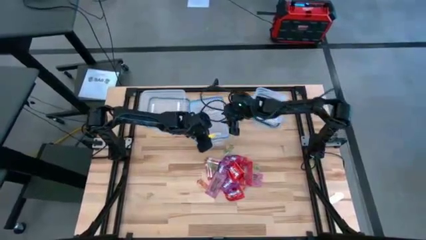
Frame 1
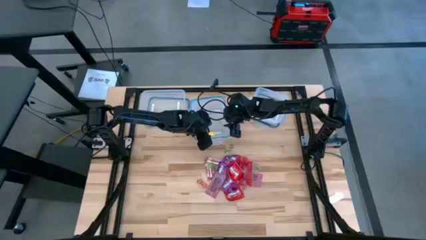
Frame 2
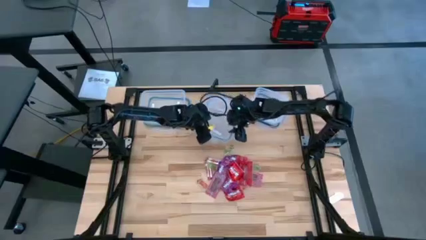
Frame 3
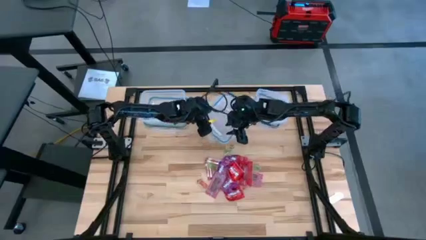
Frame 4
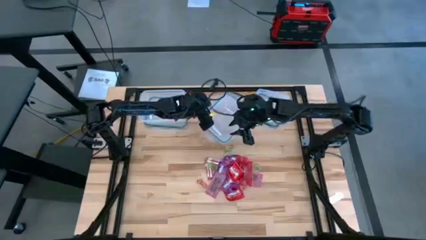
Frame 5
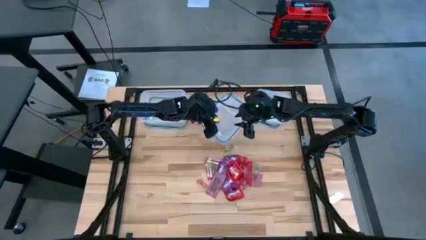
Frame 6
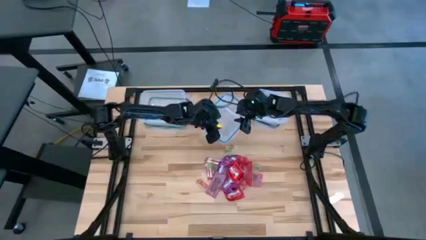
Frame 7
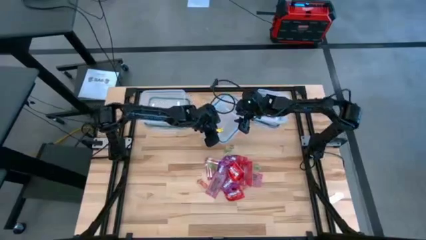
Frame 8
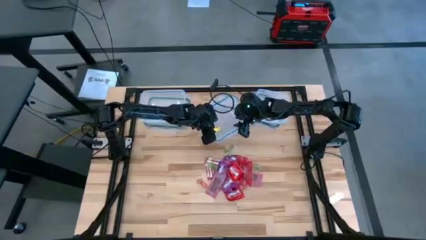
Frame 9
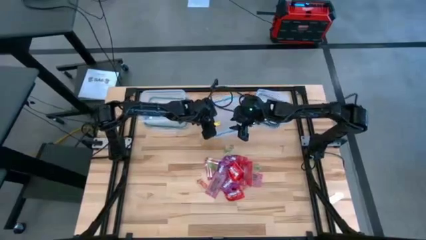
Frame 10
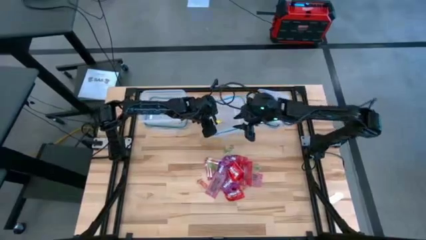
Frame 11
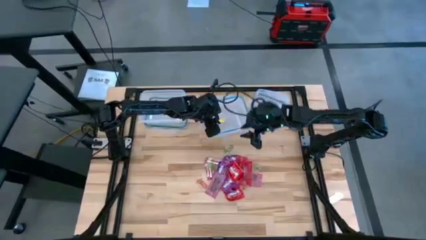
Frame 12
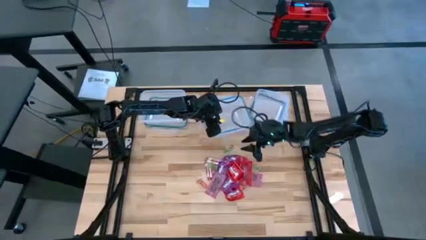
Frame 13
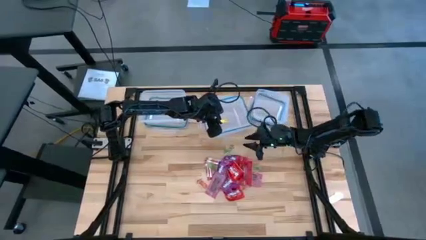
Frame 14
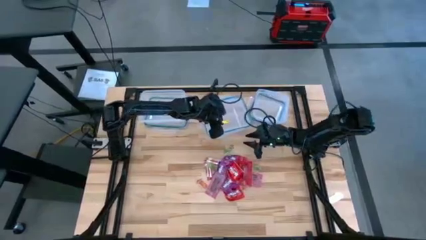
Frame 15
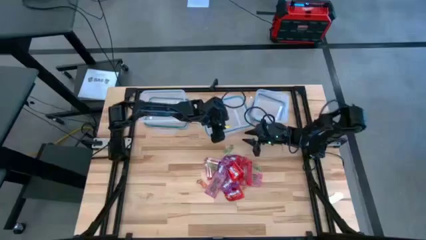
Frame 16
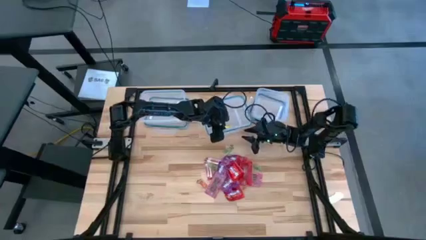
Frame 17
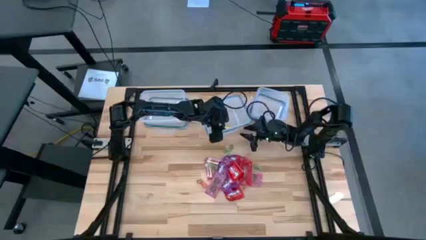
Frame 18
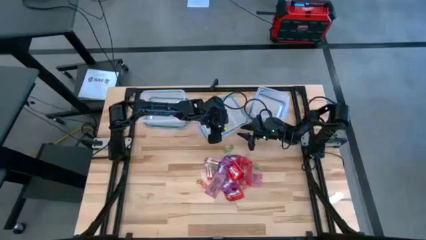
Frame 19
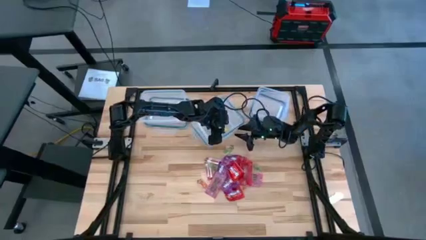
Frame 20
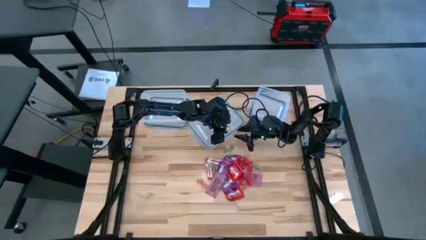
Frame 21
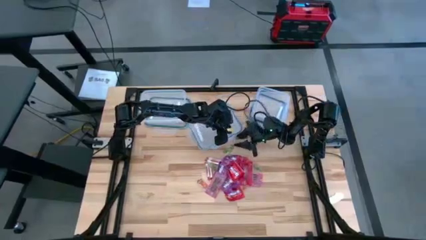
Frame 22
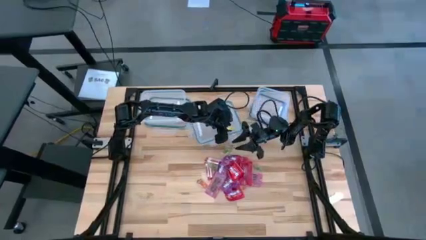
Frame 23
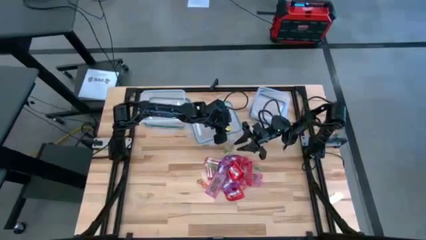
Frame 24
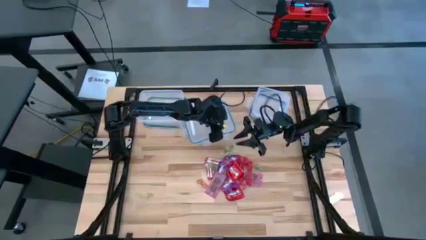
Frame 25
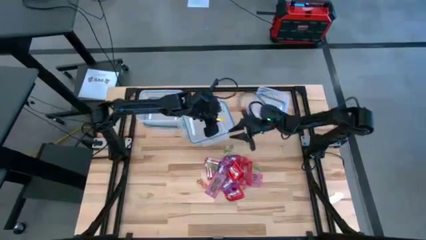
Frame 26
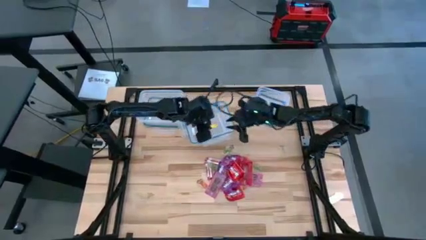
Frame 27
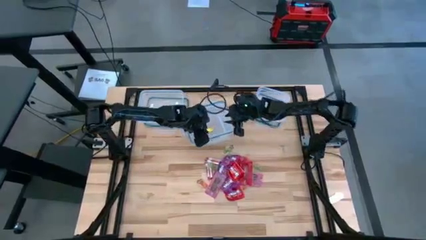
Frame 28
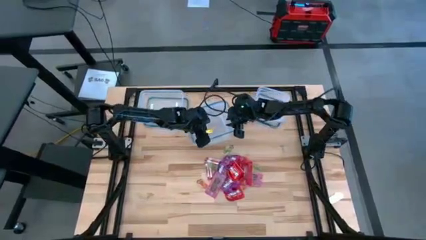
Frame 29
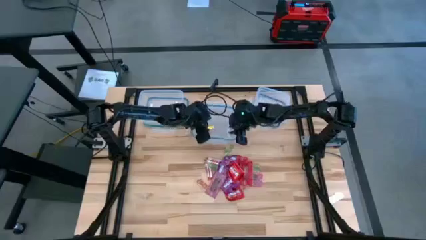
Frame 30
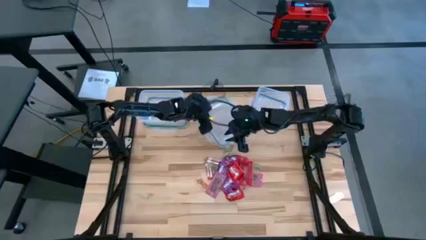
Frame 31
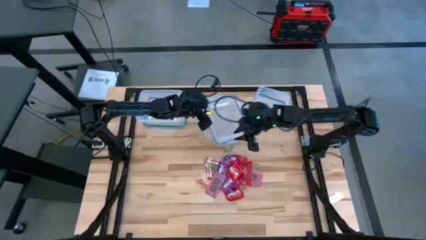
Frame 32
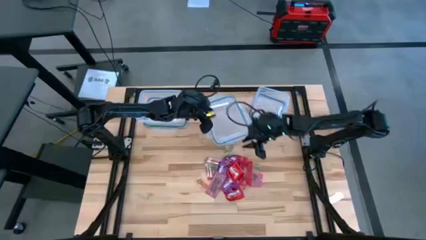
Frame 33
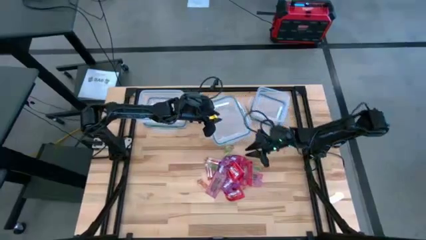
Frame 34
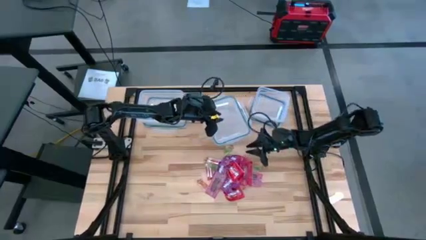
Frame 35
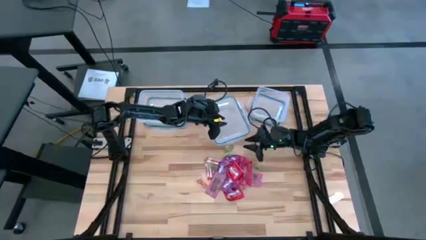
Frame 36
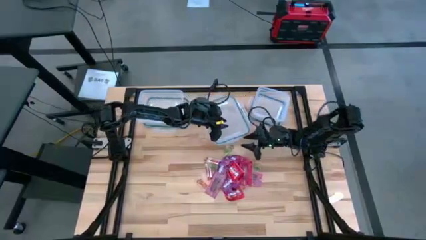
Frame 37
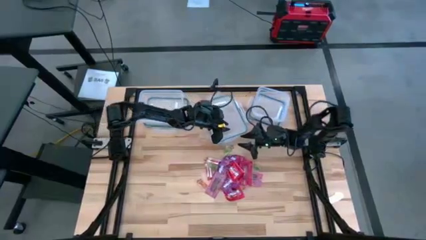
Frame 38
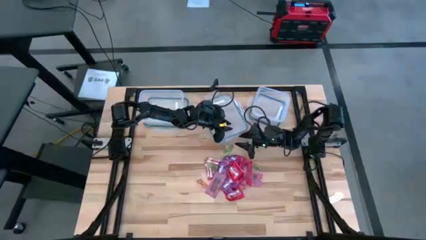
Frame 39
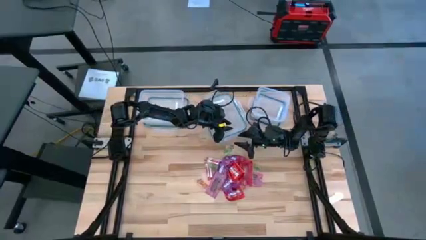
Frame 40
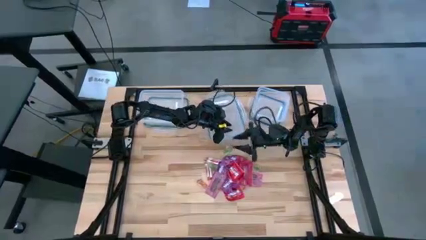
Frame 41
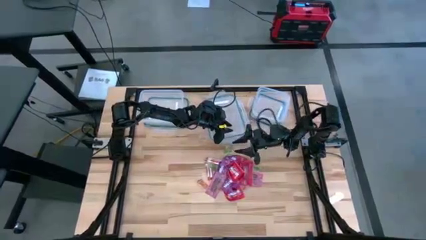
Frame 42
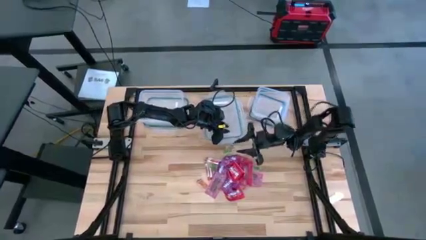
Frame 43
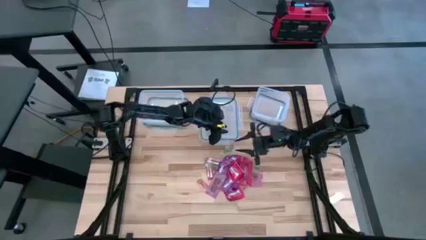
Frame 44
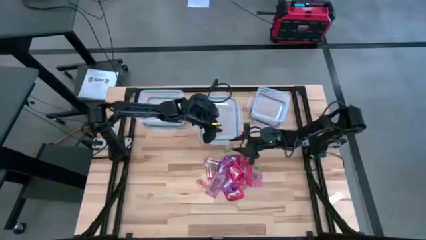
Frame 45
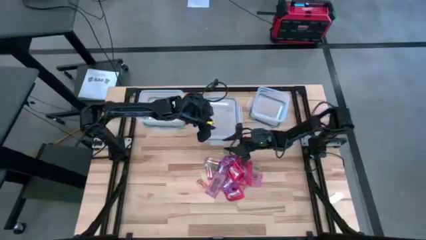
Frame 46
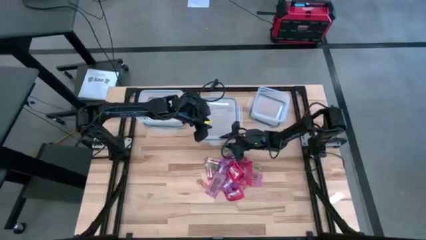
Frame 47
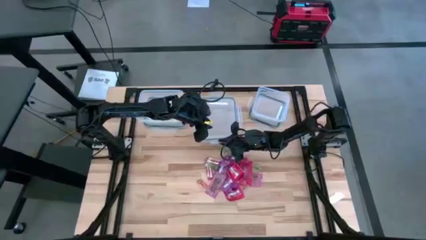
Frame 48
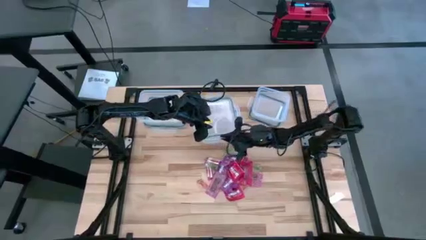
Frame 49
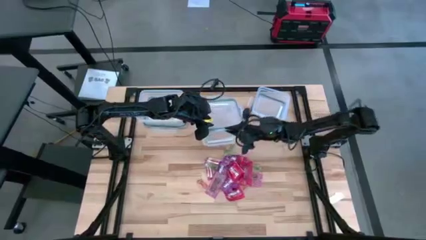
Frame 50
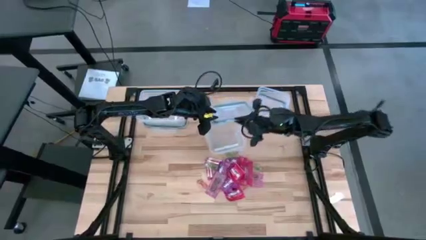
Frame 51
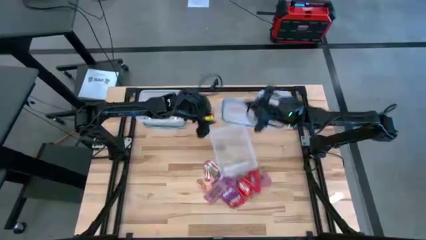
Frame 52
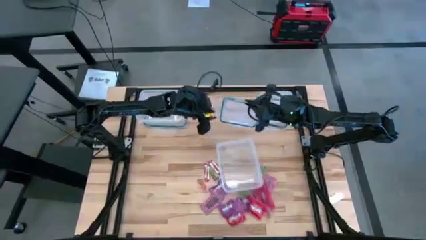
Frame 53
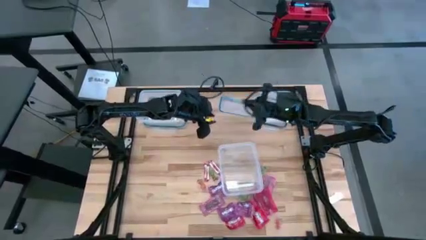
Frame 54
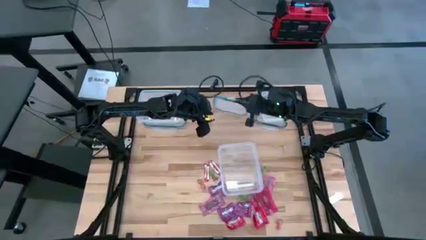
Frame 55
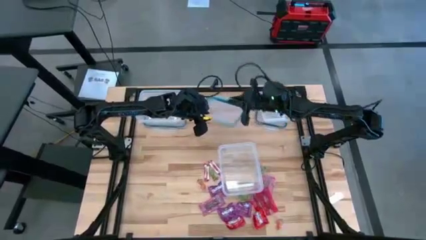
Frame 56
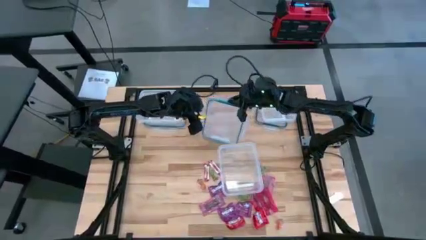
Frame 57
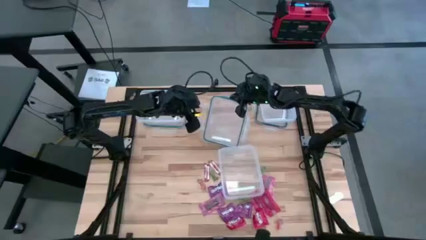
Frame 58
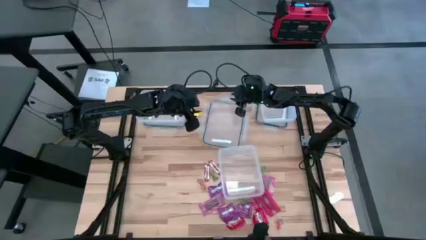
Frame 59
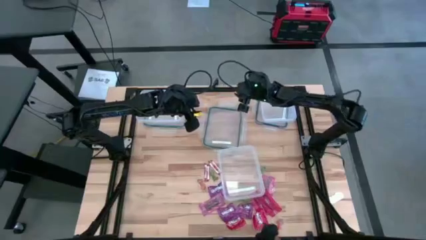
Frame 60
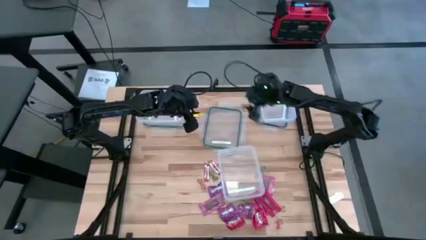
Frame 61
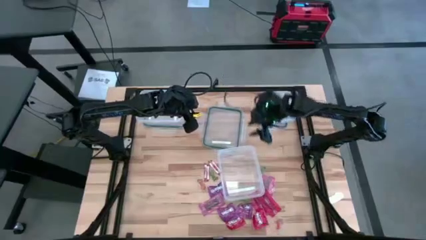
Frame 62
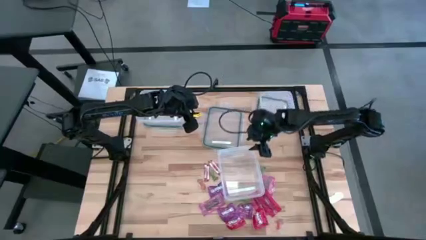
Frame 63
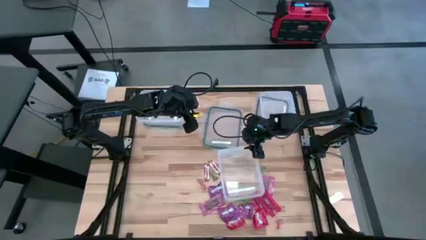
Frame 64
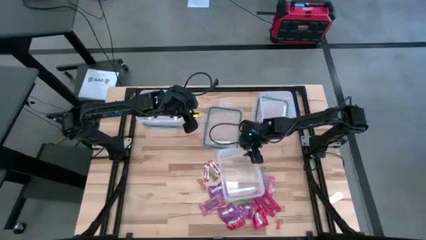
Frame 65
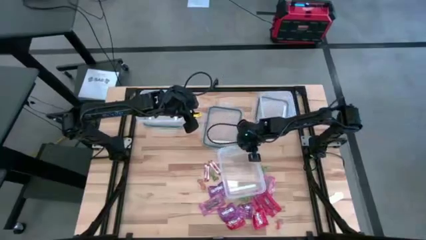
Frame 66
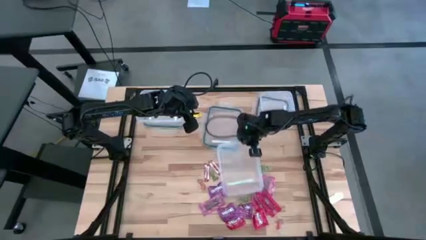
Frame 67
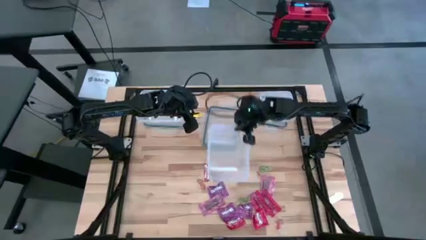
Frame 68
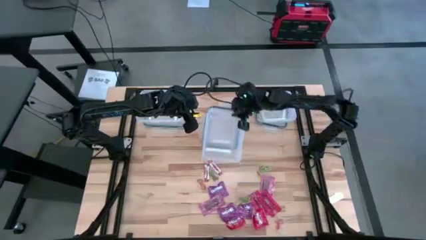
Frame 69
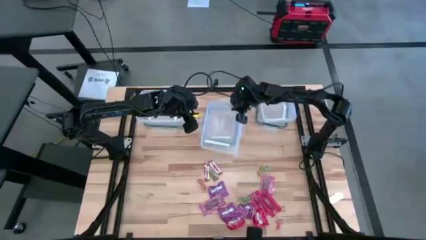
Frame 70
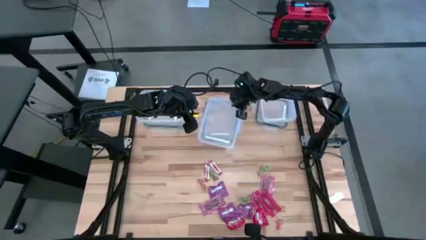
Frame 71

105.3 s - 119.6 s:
Task: Sort candy
Open the bottom left transparent bin

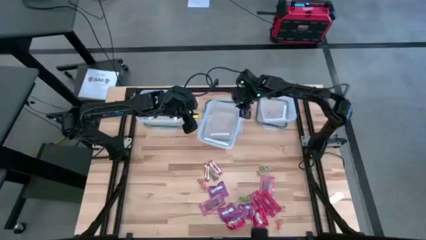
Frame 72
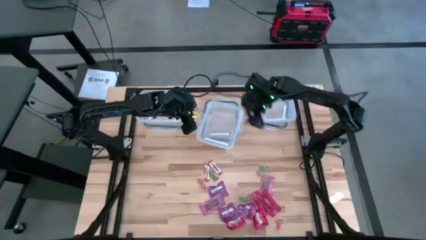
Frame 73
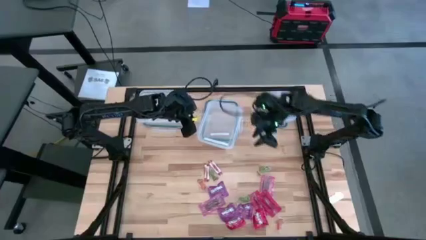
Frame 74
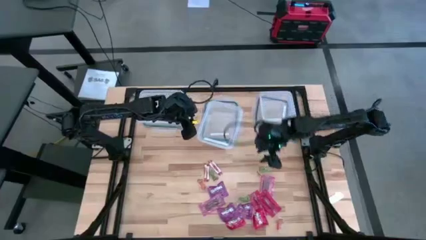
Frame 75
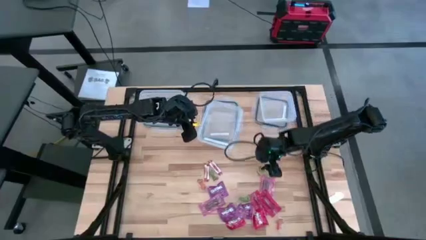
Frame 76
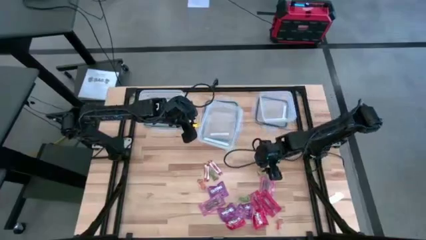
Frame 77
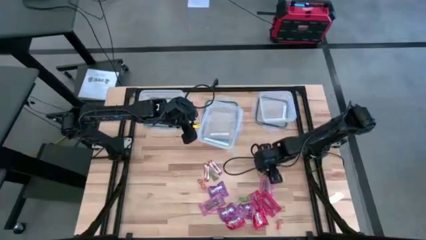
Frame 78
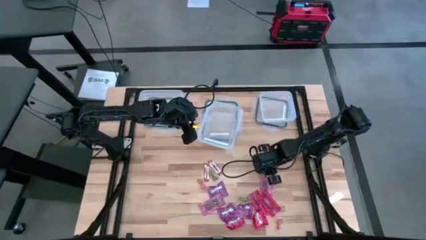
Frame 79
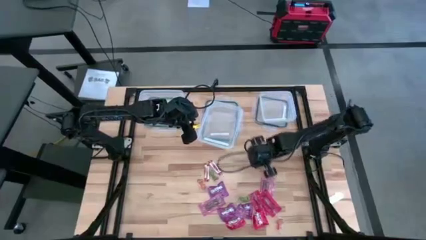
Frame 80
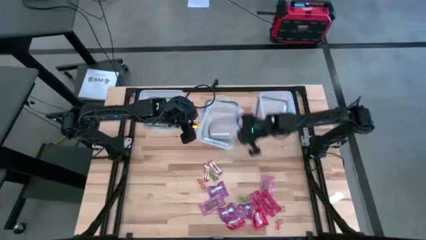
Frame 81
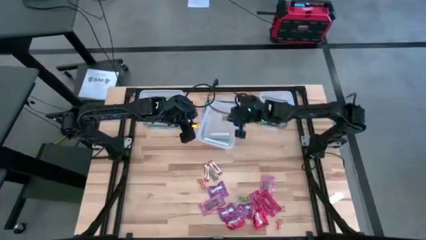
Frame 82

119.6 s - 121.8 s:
Put the top right green candy into the center transparent bin

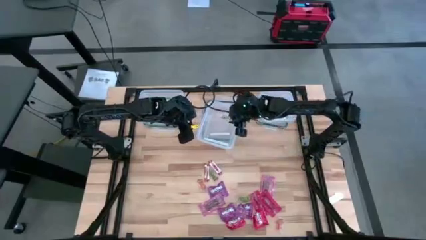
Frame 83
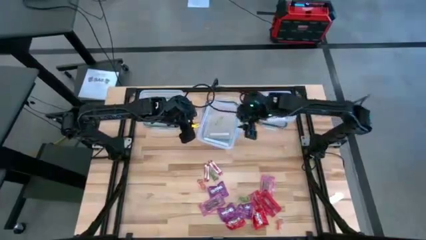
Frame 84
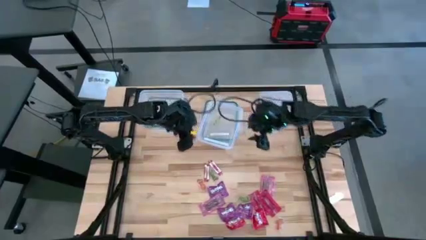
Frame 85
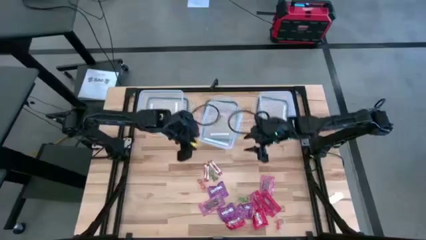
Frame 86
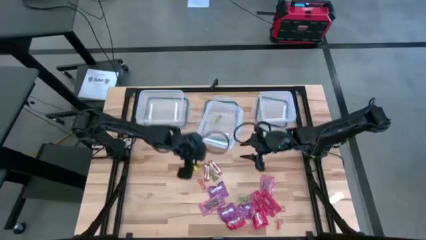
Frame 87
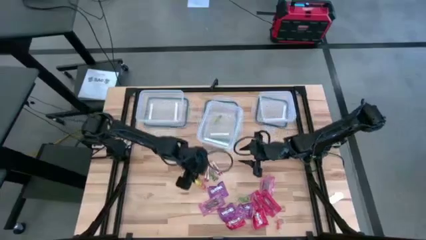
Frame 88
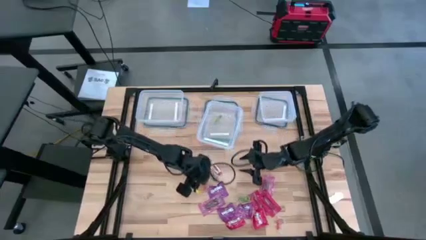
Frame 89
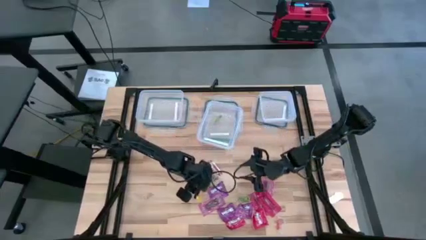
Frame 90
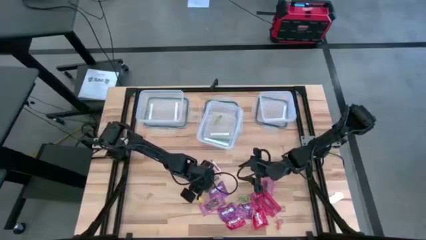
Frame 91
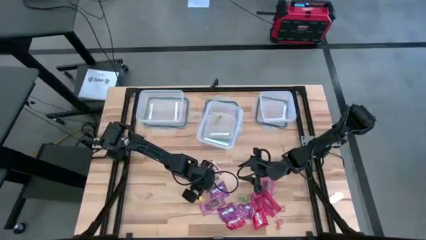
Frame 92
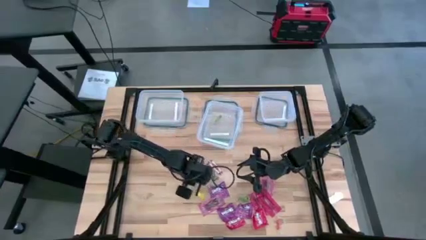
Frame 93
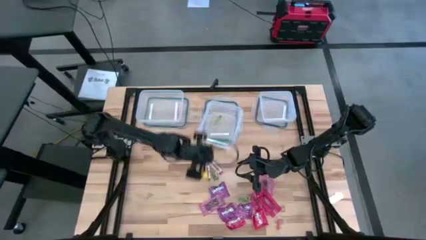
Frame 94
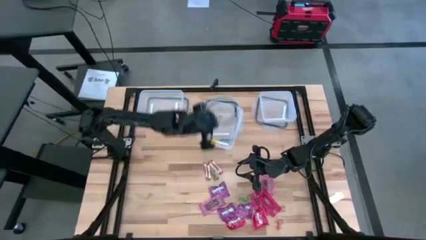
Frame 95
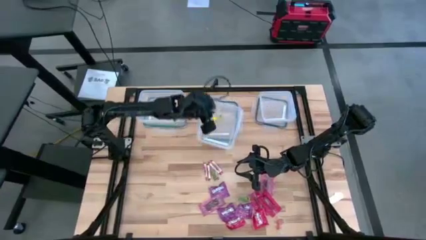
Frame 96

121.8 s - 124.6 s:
Put the left orange candy into the center transparent bin
